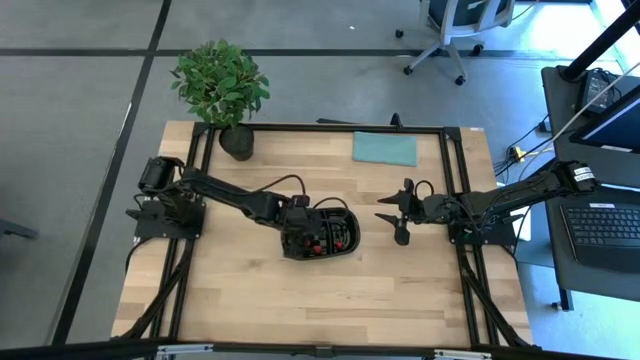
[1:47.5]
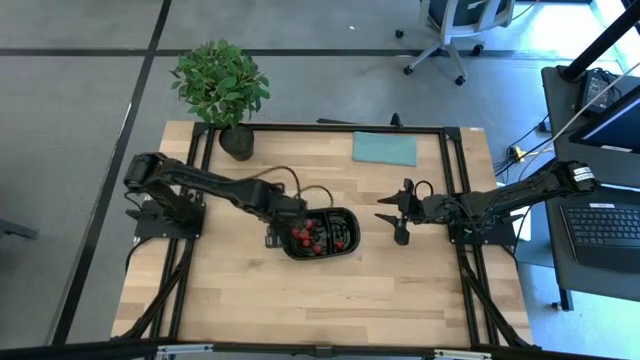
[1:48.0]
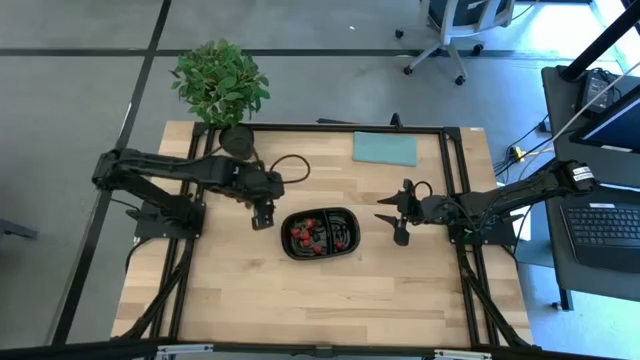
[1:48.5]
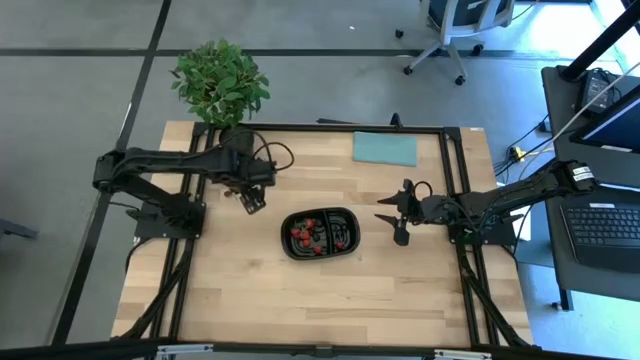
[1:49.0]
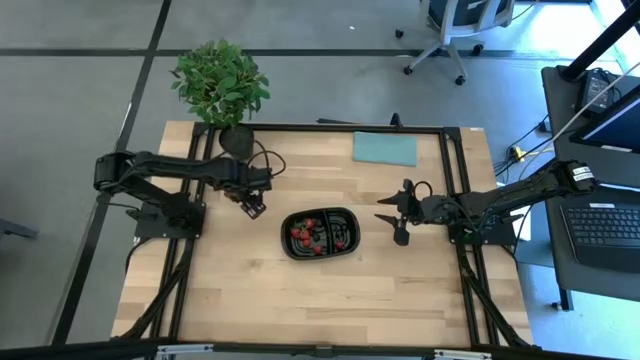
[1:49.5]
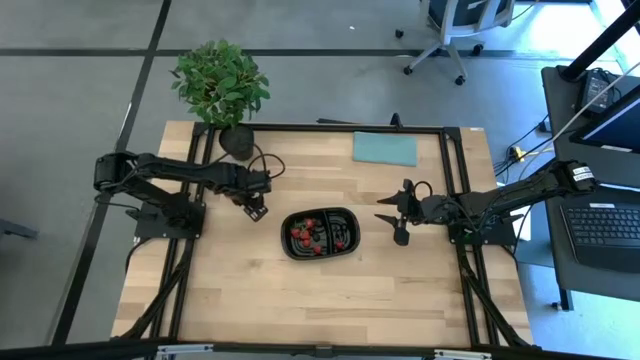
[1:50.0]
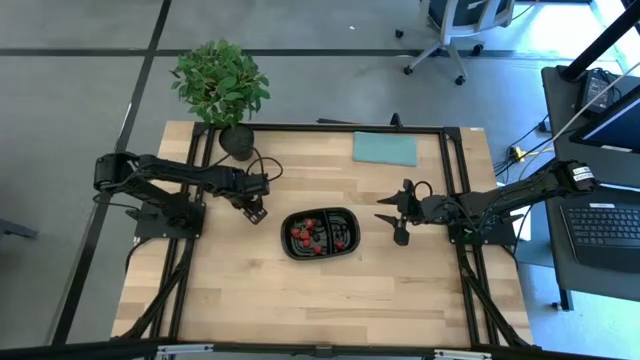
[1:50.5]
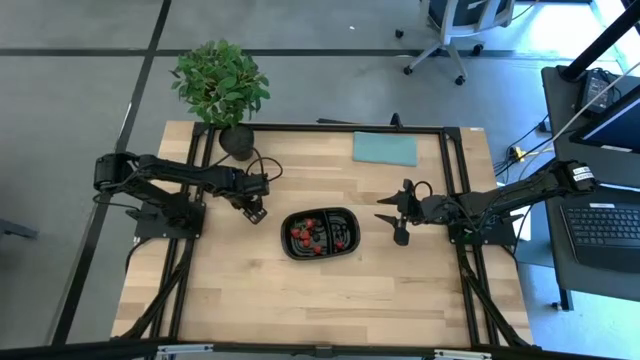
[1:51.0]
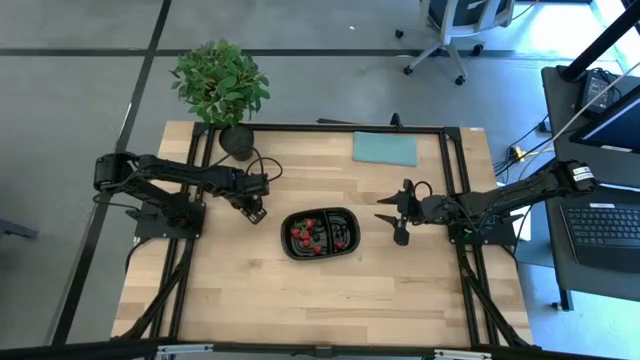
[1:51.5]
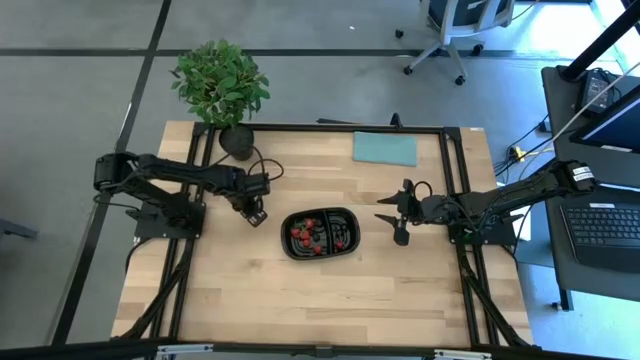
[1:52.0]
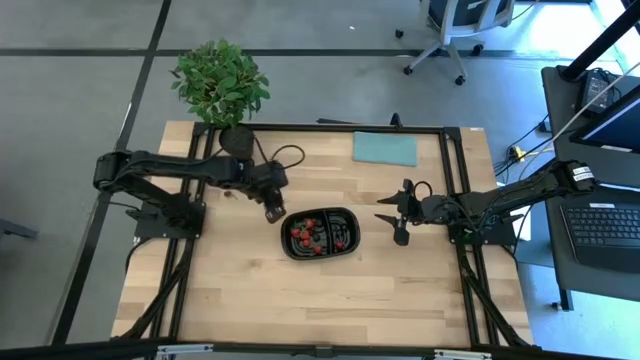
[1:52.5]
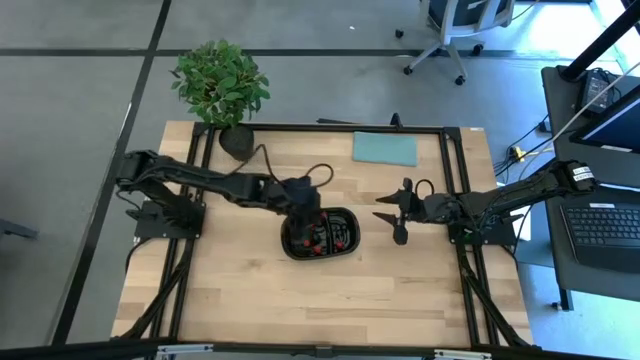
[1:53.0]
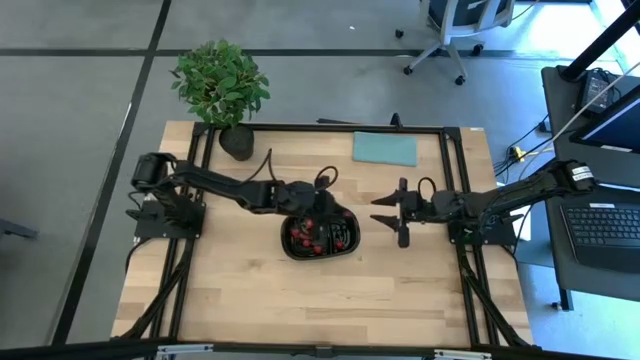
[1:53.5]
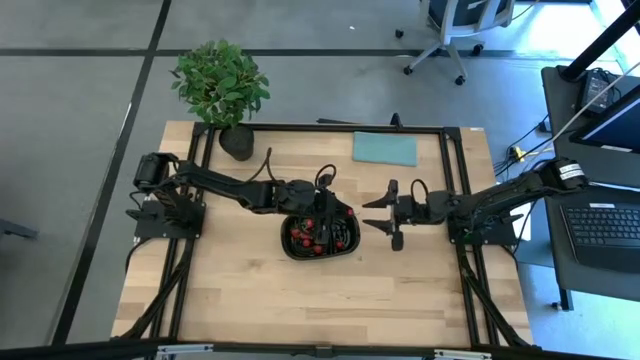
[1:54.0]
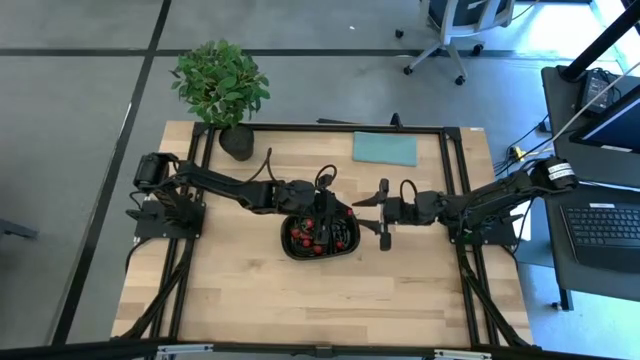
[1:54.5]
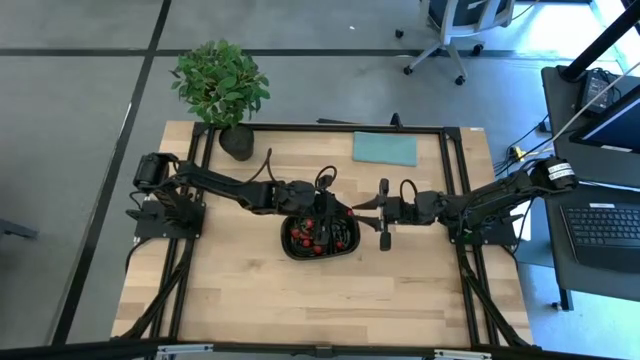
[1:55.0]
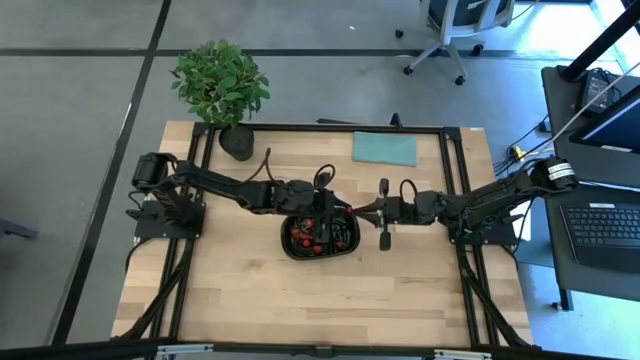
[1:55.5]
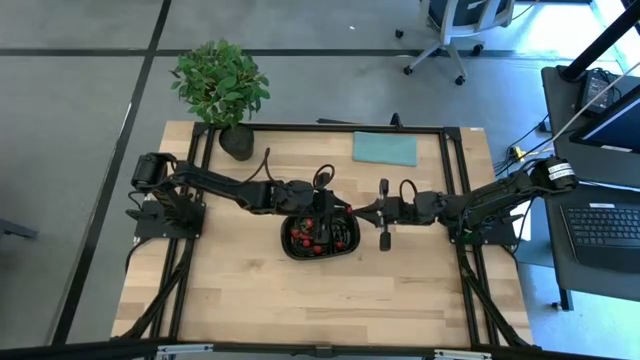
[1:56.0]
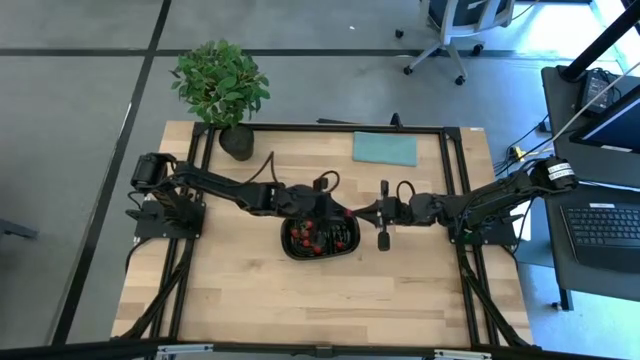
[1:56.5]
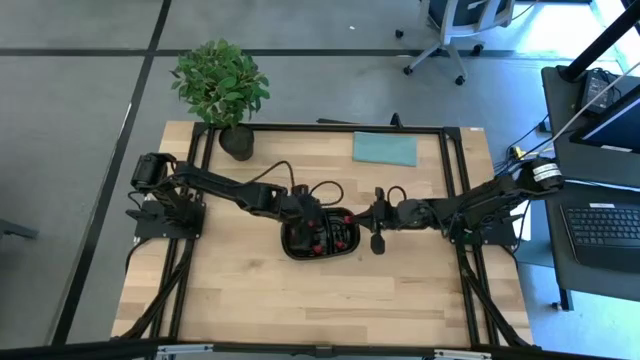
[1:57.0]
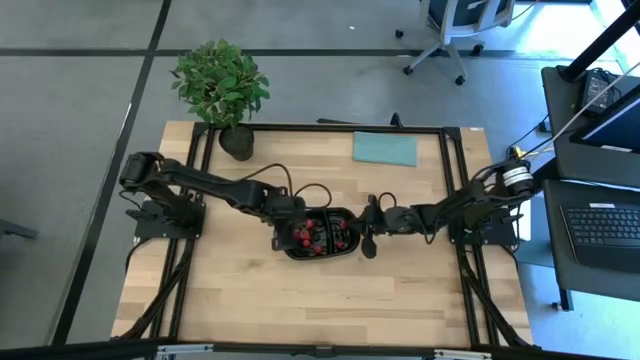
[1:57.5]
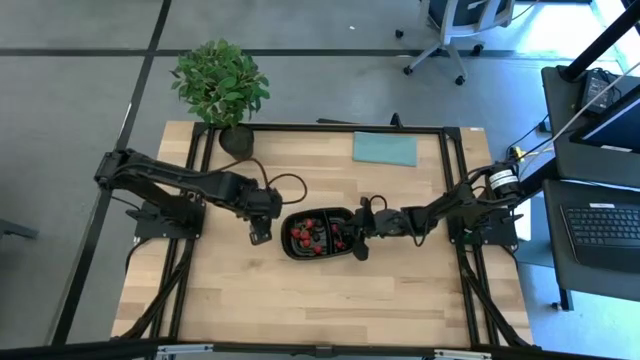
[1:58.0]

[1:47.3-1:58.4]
Task: Pick and placing Produce into tupperware
Put the right red cherry into the right section of the black bin

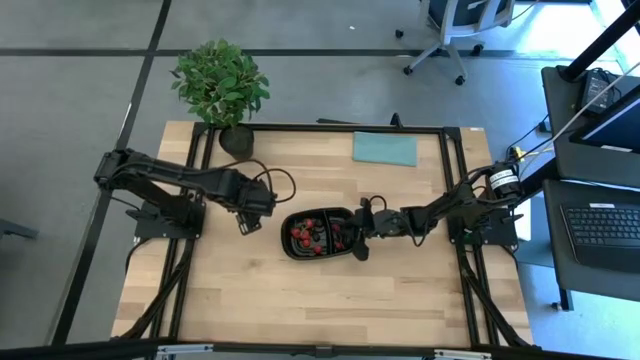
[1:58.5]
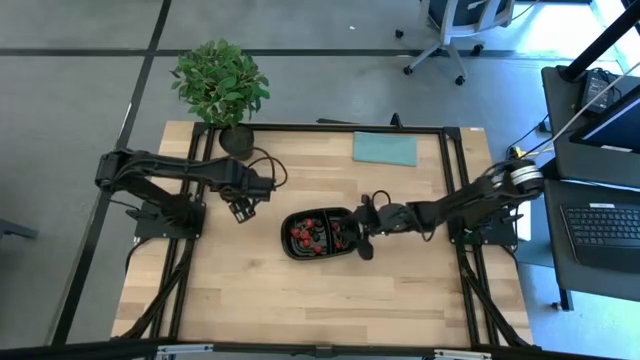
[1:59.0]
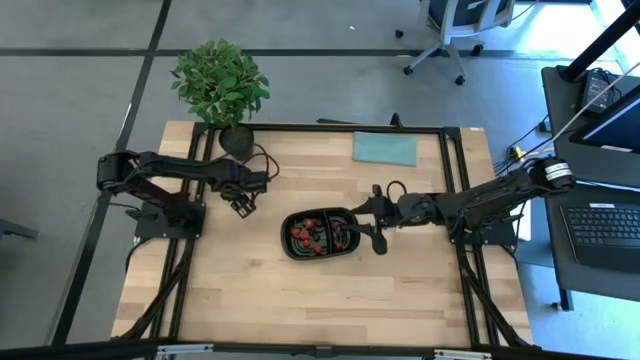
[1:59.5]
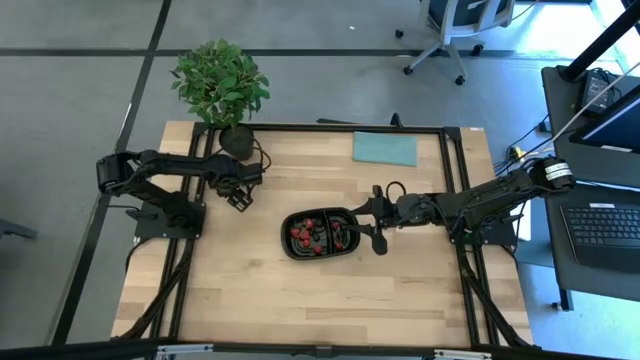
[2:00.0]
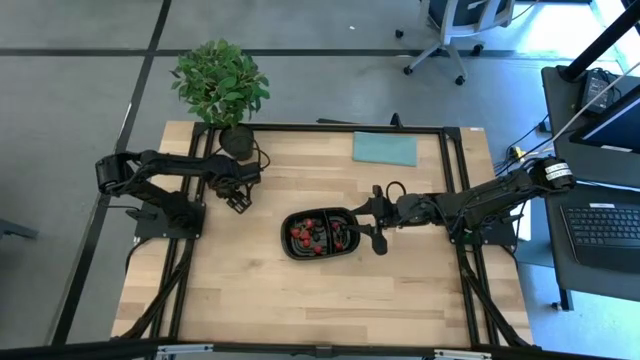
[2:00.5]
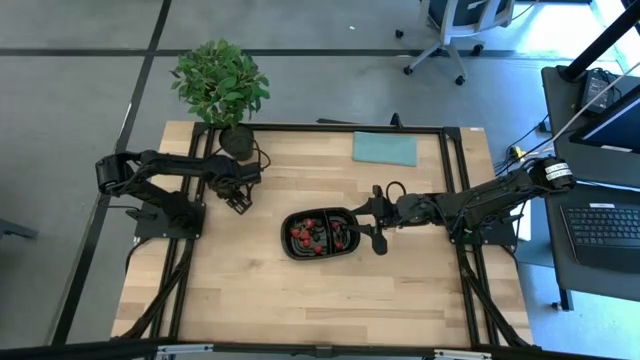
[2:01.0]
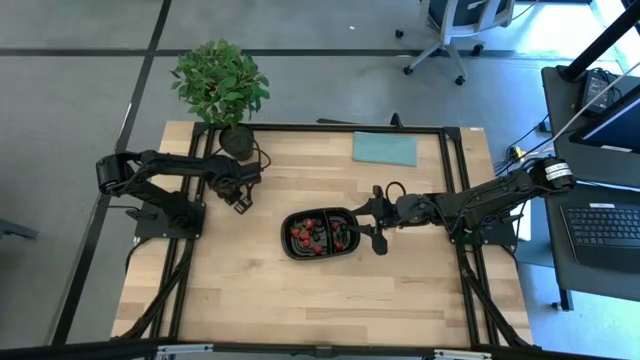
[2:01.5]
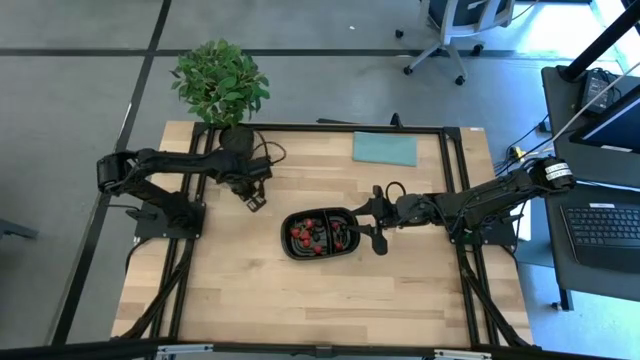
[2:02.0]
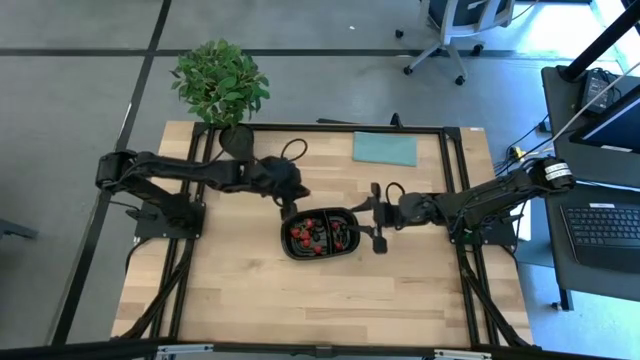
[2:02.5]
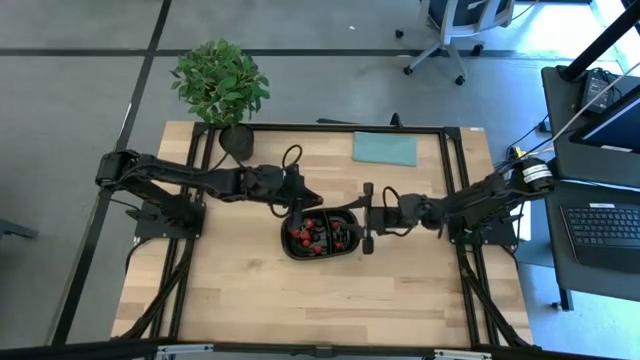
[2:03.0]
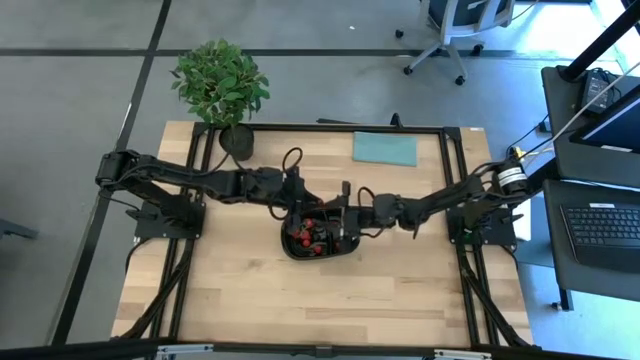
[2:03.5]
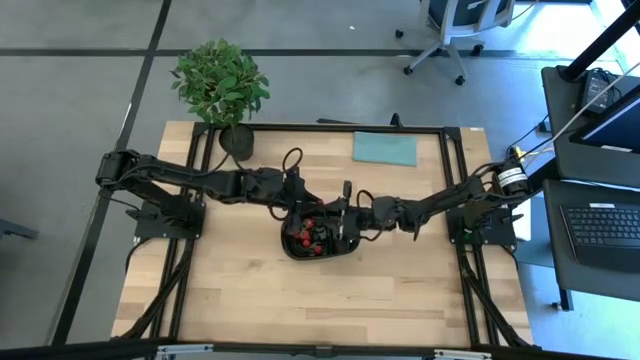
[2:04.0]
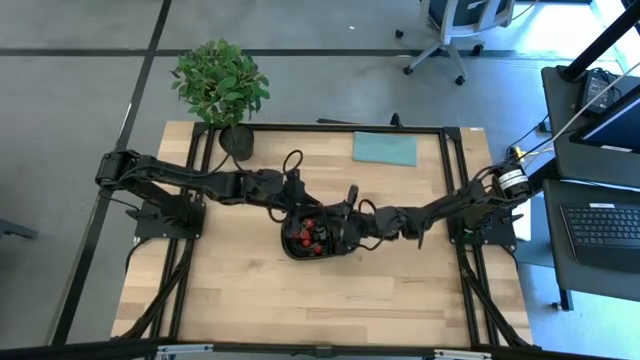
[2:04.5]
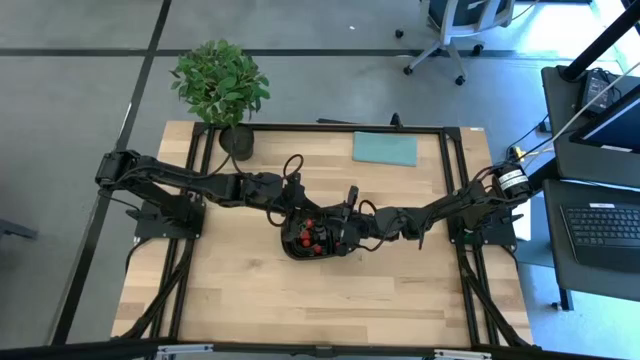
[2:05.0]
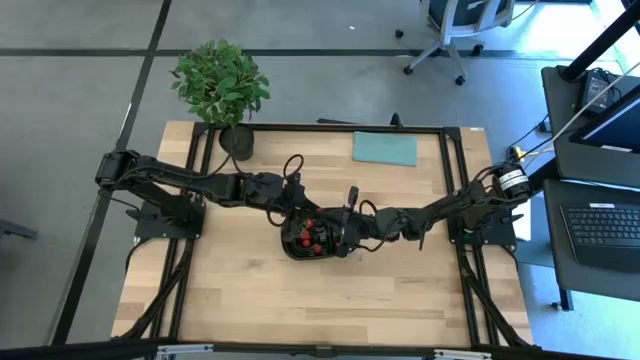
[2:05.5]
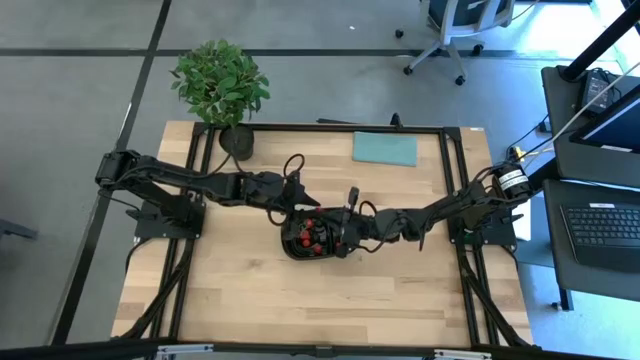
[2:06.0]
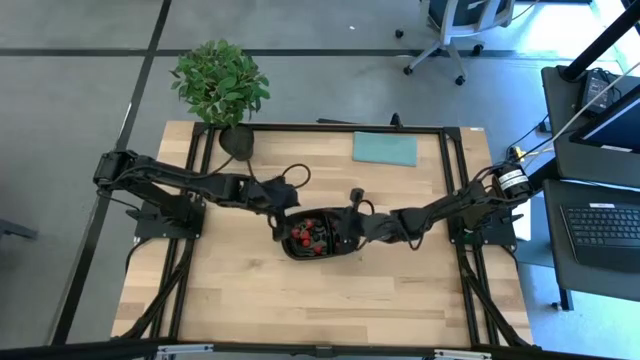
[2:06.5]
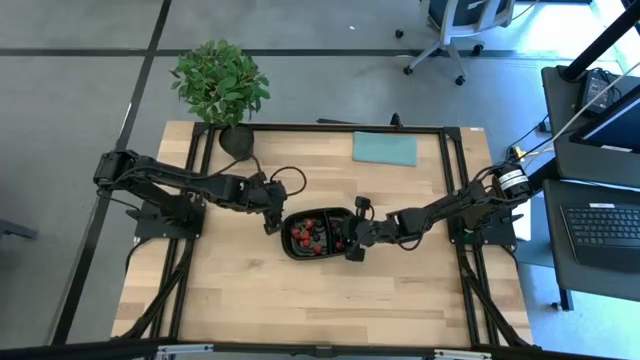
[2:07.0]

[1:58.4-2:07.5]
Put the red cherry into the right section of the black bin
